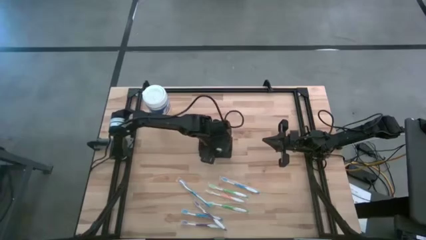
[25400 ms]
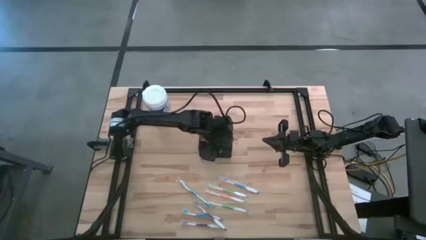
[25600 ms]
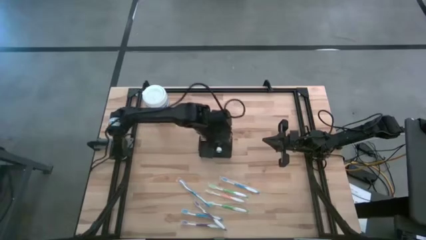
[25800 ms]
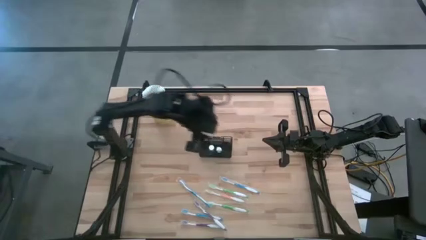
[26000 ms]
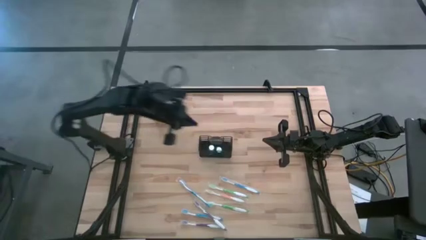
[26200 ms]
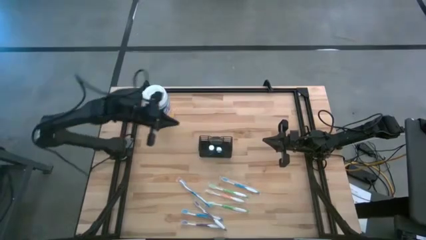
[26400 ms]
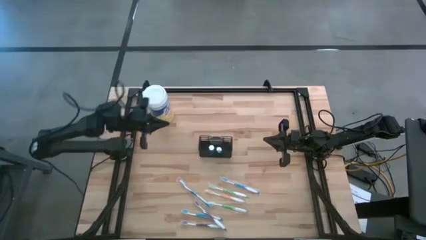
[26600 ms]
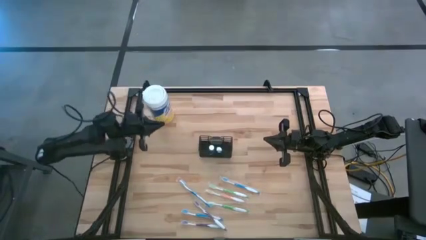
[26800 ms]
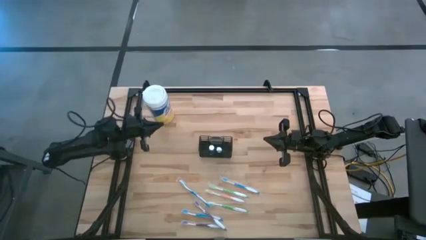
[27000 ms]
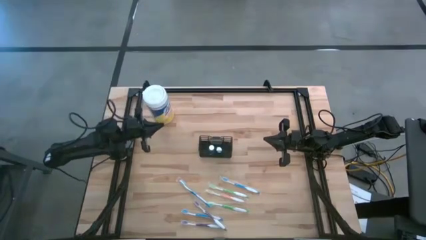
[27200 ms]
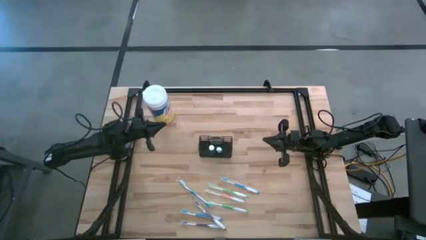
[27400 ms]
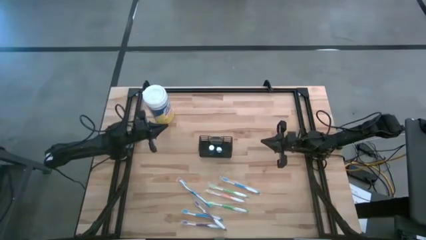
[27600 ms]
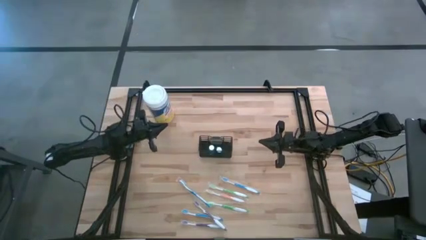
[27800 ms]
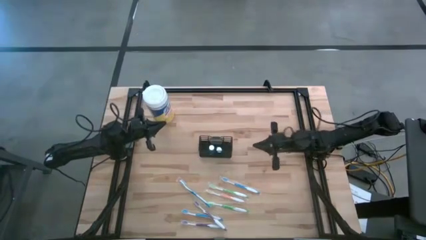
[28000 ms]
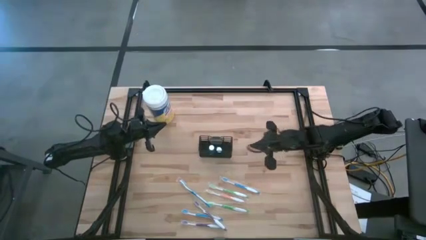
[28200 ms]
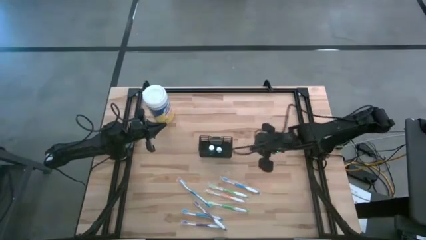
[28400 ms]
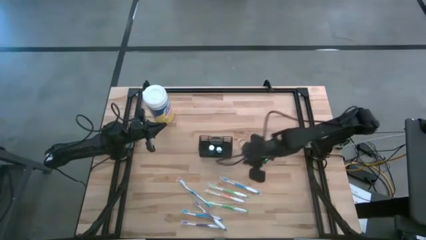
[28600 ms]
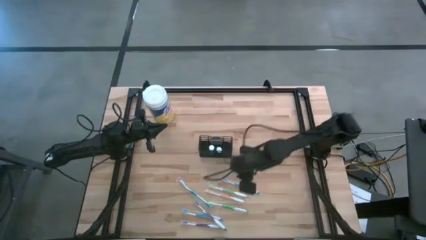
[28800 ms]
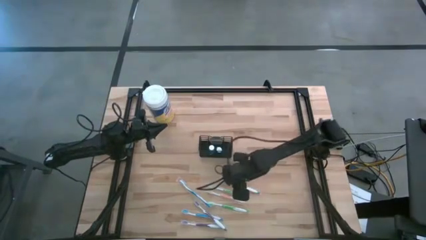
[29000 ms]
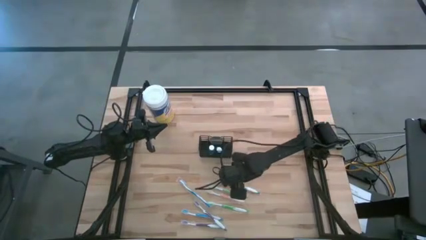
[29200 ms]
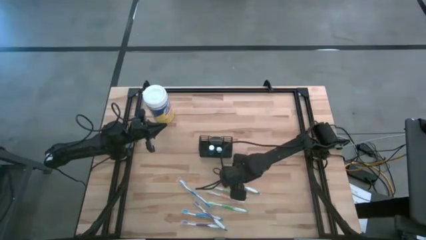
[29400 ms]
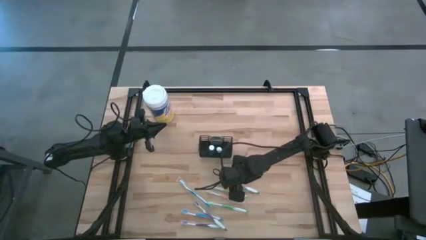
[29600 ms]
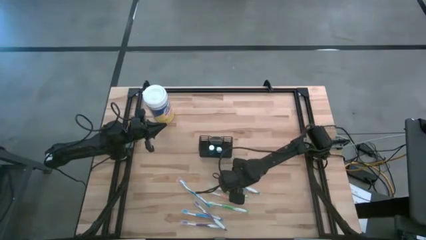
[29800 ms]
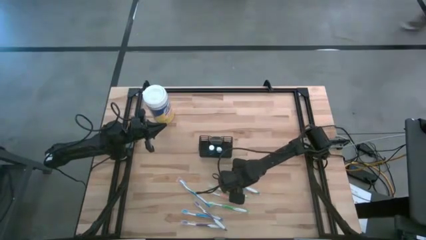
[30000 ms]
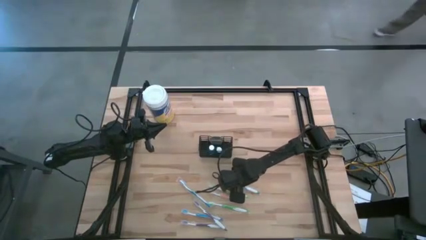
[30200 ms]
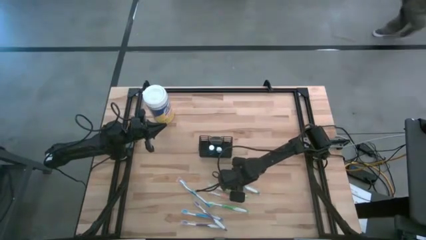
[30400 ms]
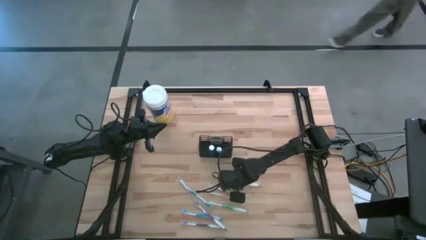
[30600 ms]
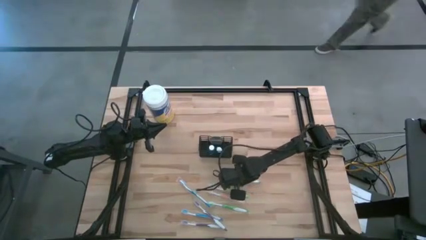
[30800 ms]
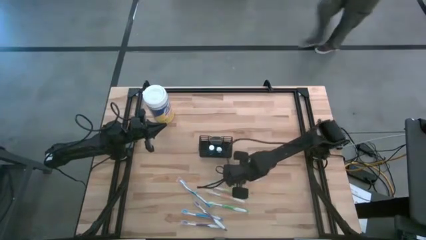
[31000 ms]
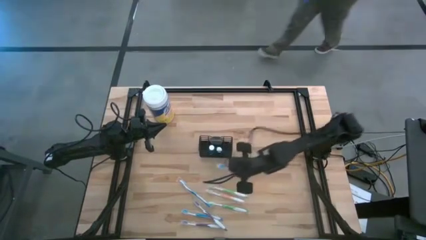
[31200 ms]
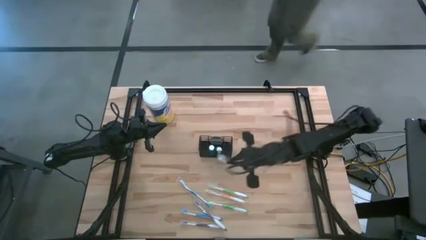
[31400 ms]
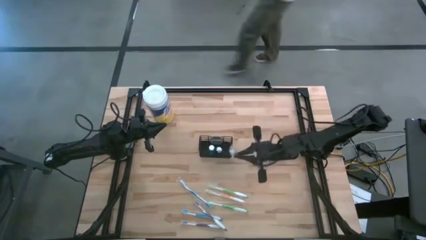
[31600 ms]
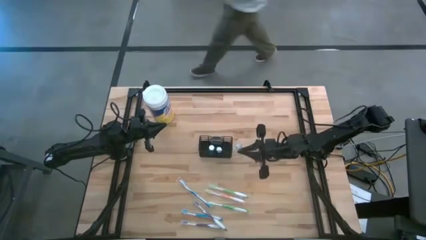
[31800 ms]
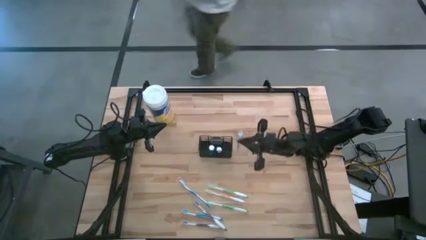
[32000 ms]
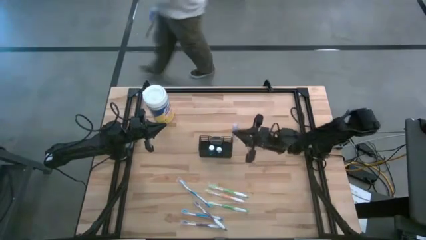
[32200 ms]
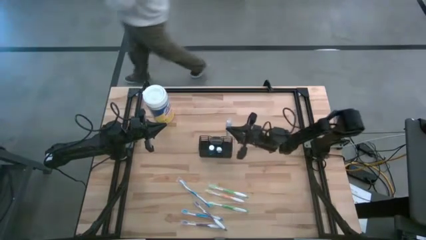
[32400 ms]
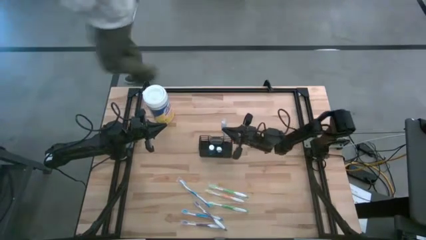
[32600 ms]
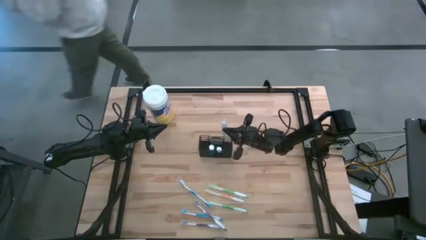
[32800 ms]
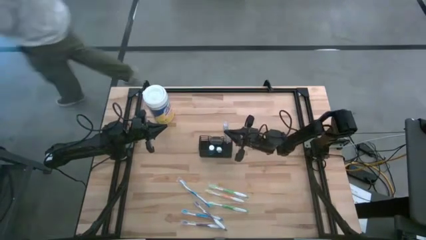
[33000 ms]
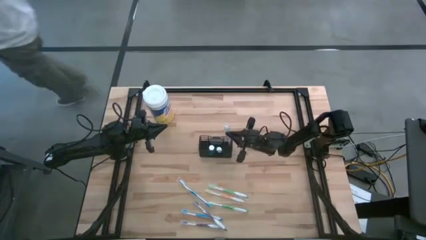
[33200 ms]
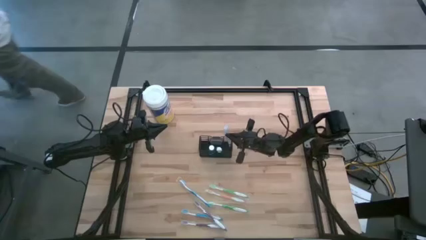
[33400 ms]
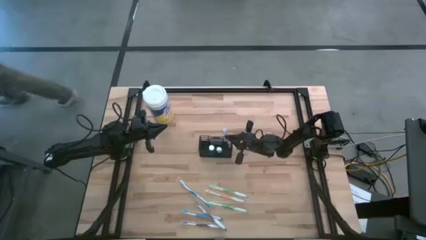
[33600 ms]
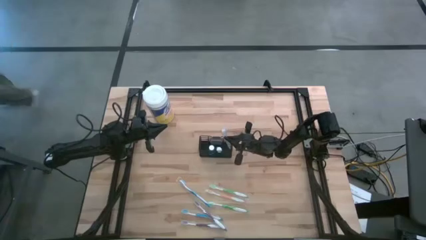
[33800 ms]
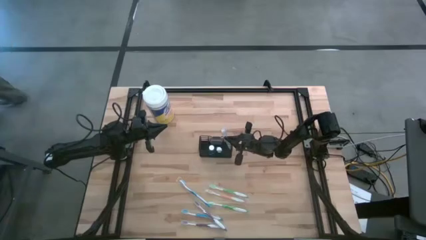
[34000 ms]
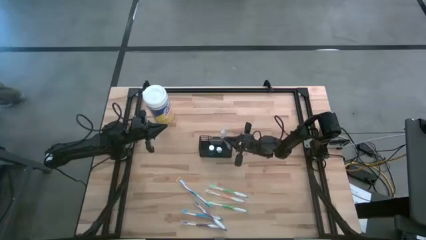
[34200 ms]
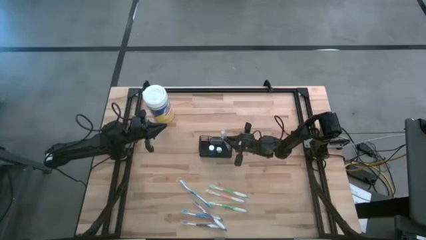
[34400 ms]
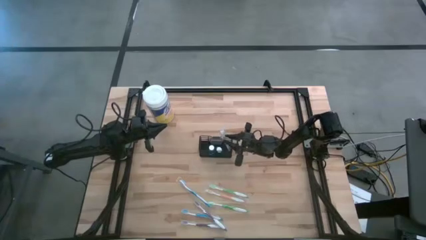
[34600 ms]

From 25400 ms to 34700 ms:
Task: Pick & Place toothbrushing station
Put the top blue toothbrush into the wire organizer
